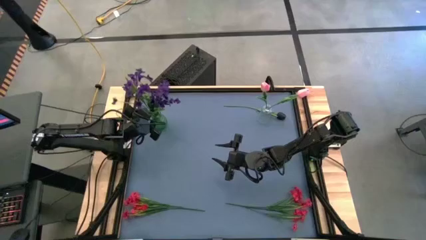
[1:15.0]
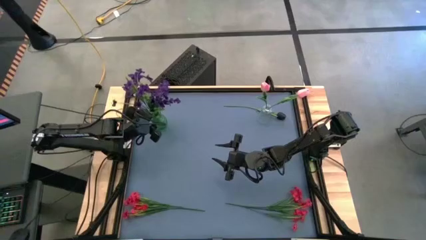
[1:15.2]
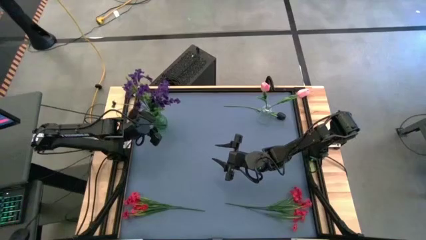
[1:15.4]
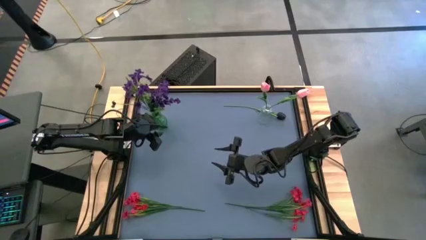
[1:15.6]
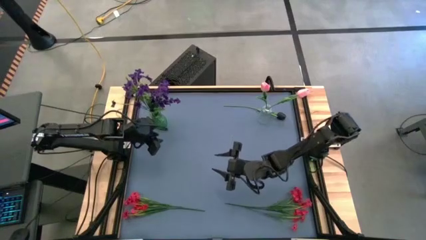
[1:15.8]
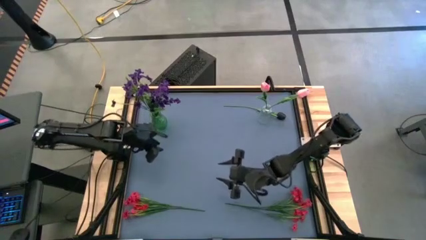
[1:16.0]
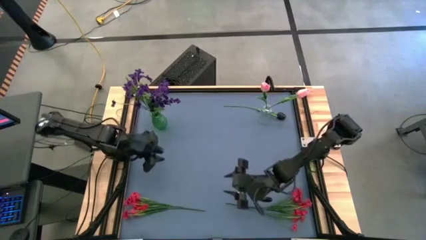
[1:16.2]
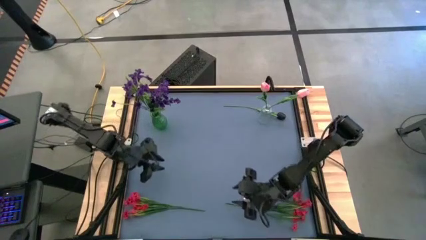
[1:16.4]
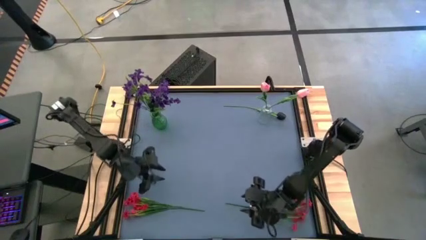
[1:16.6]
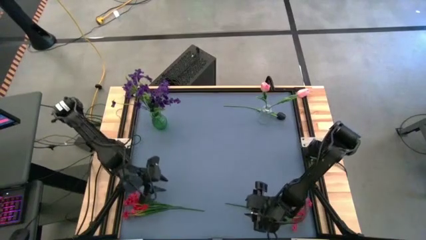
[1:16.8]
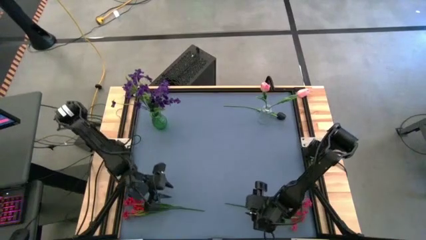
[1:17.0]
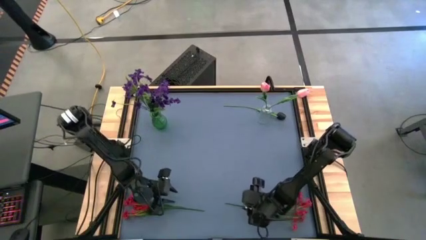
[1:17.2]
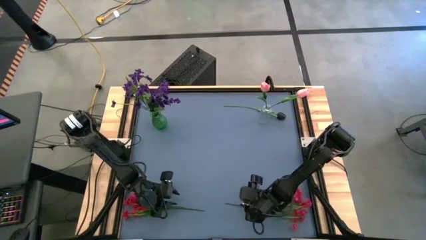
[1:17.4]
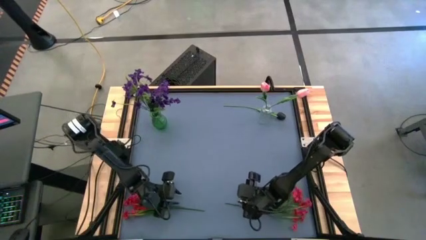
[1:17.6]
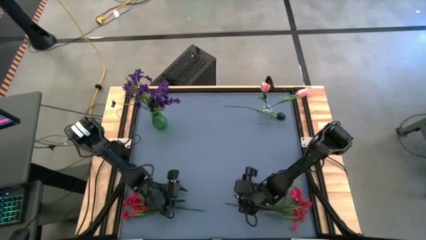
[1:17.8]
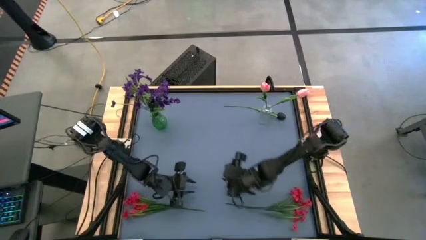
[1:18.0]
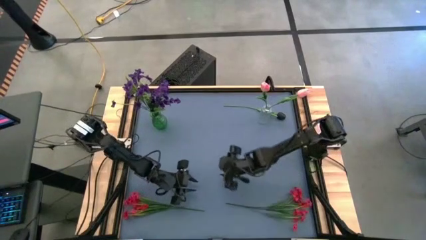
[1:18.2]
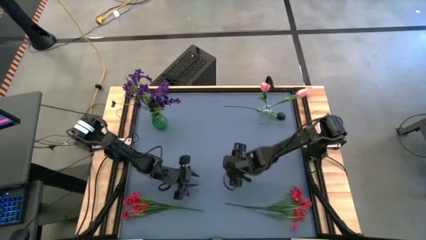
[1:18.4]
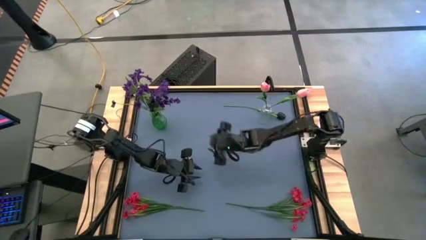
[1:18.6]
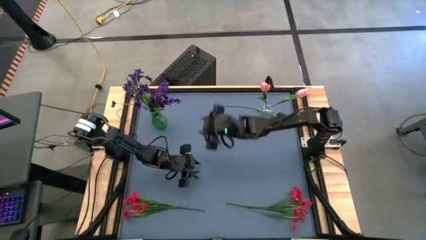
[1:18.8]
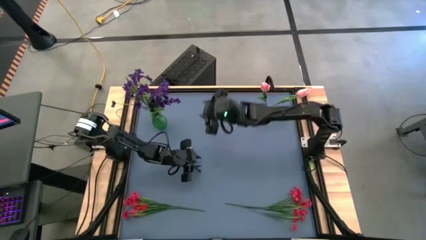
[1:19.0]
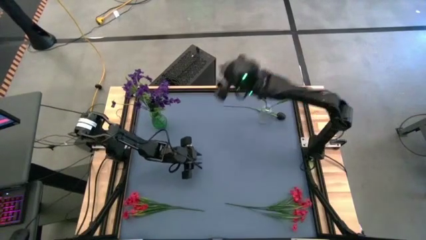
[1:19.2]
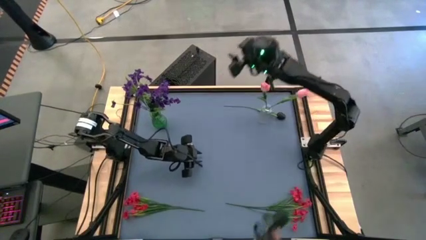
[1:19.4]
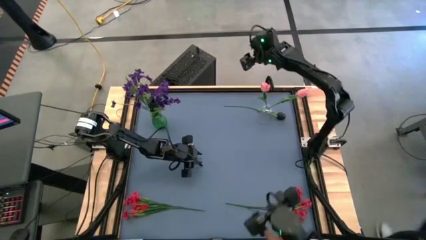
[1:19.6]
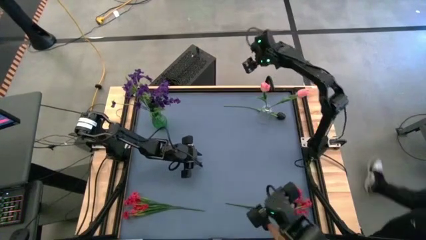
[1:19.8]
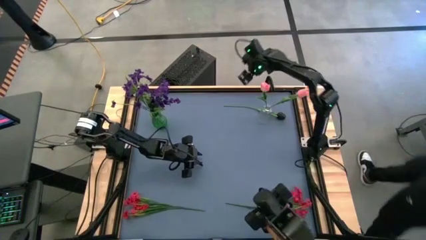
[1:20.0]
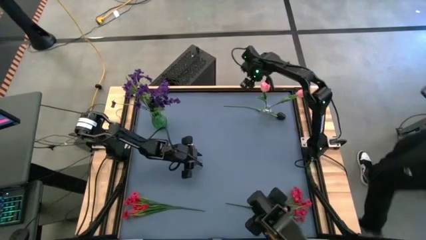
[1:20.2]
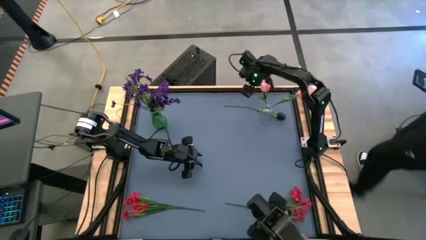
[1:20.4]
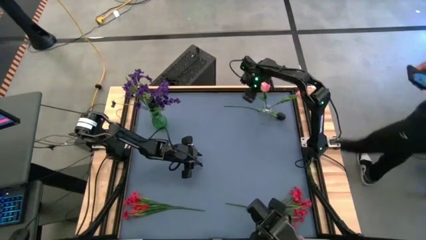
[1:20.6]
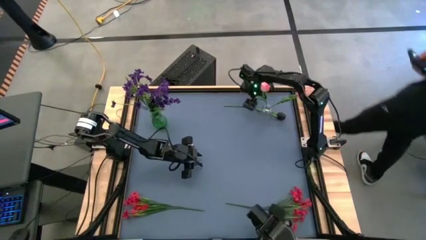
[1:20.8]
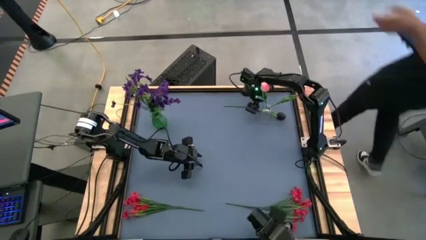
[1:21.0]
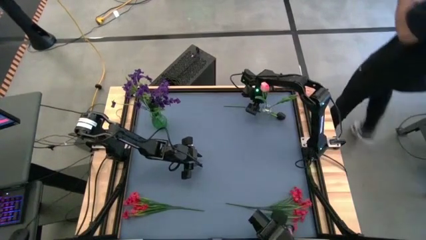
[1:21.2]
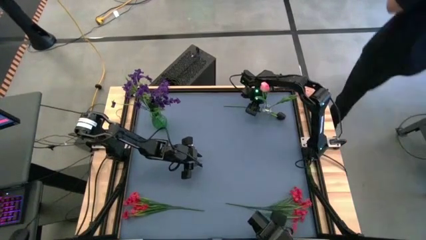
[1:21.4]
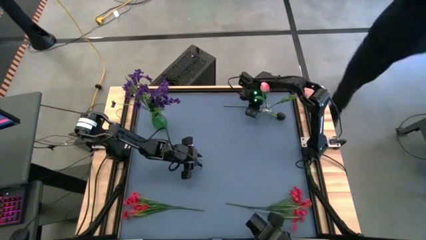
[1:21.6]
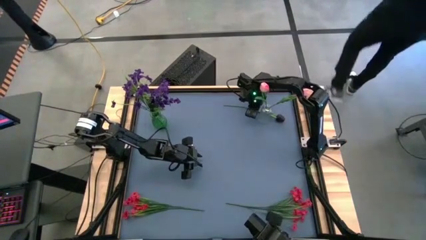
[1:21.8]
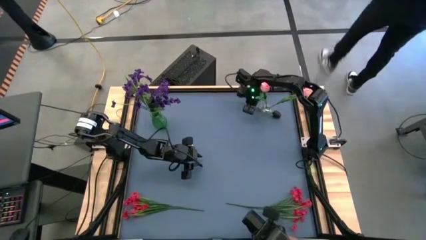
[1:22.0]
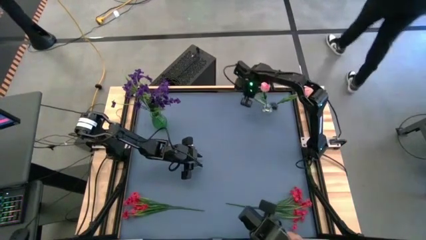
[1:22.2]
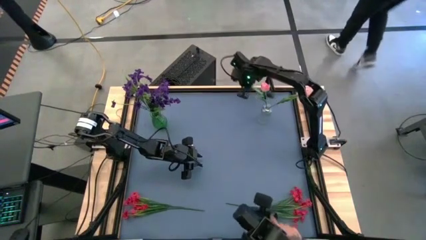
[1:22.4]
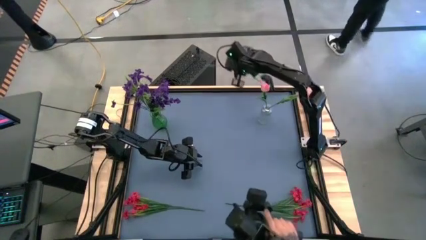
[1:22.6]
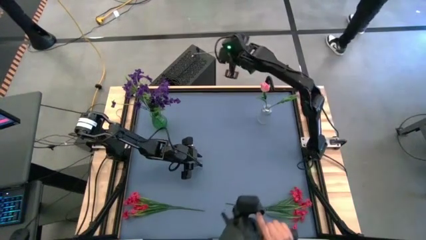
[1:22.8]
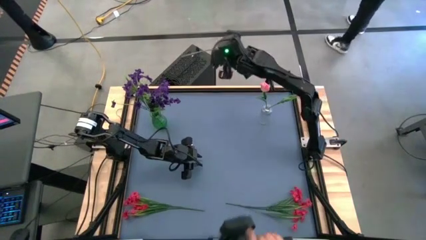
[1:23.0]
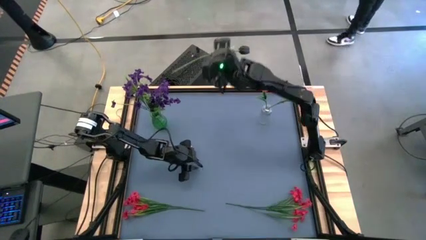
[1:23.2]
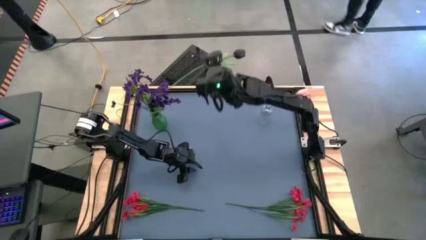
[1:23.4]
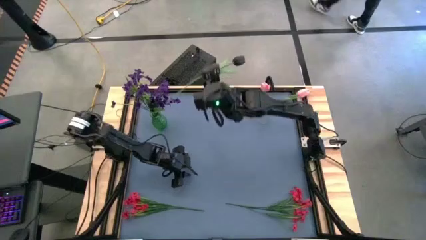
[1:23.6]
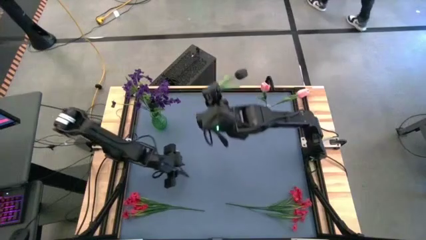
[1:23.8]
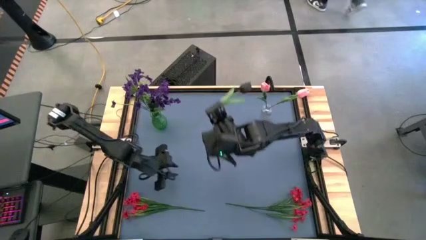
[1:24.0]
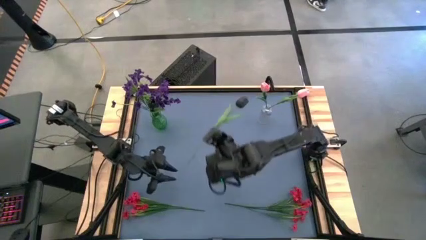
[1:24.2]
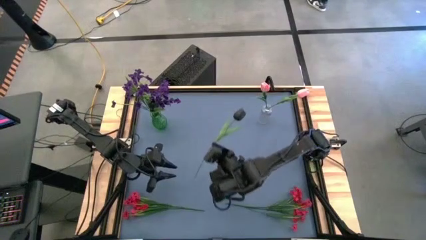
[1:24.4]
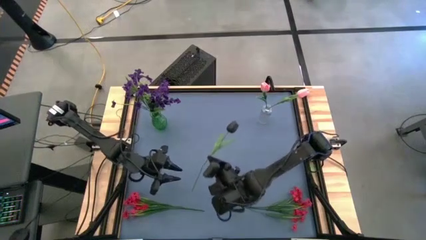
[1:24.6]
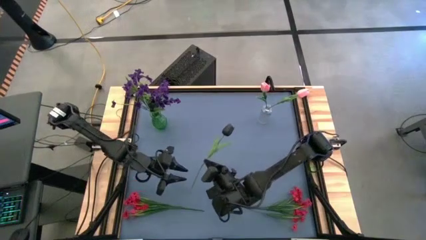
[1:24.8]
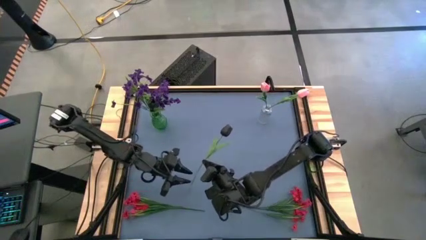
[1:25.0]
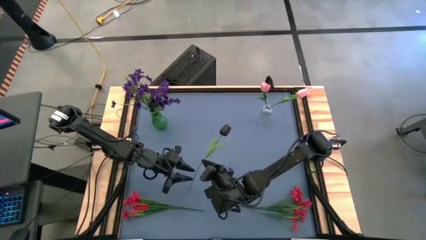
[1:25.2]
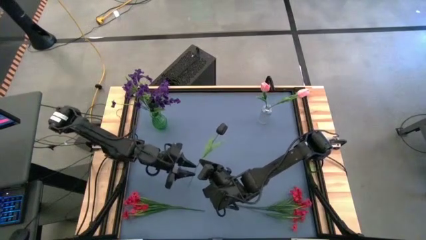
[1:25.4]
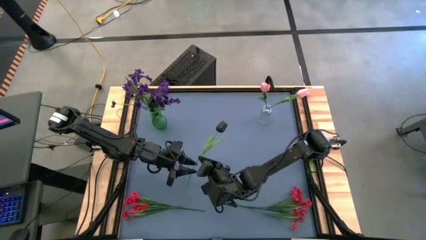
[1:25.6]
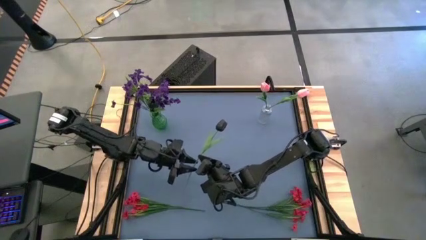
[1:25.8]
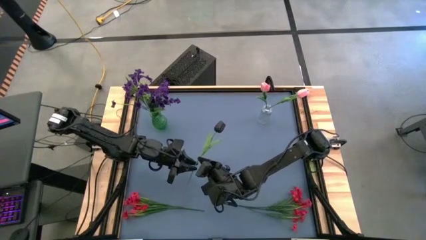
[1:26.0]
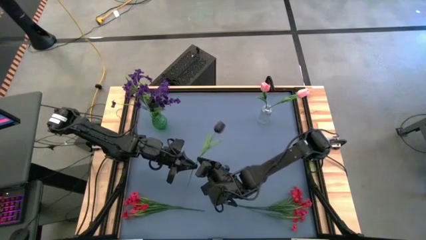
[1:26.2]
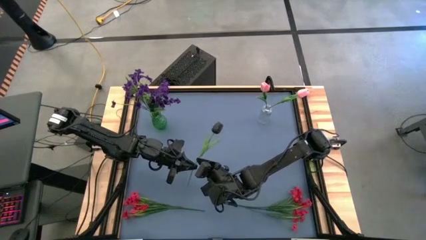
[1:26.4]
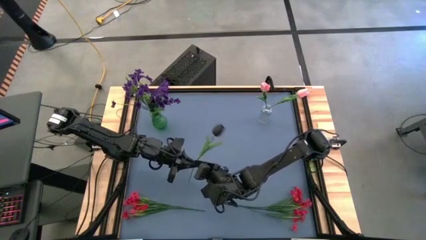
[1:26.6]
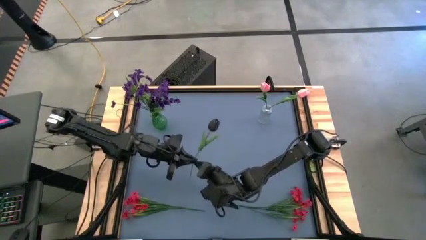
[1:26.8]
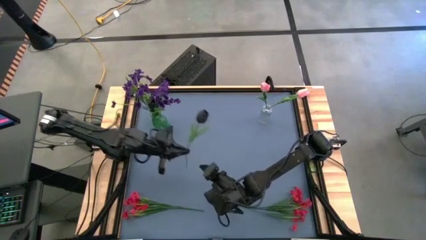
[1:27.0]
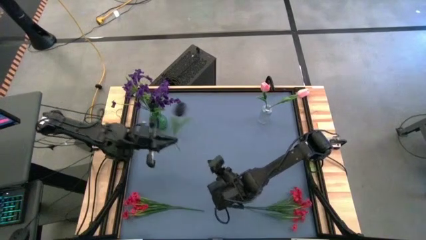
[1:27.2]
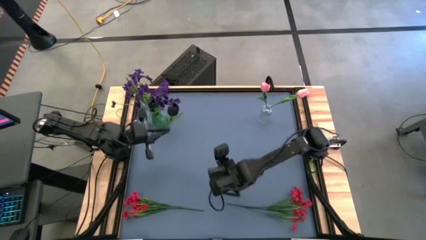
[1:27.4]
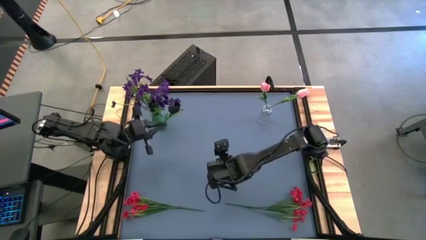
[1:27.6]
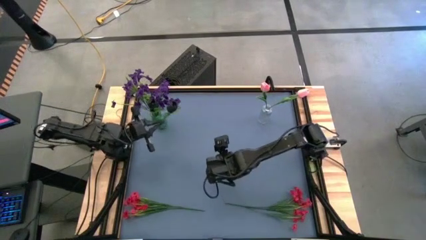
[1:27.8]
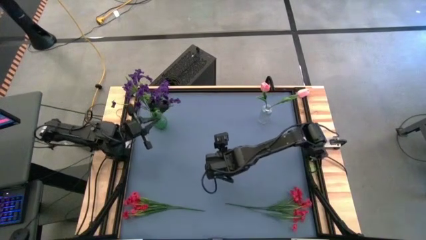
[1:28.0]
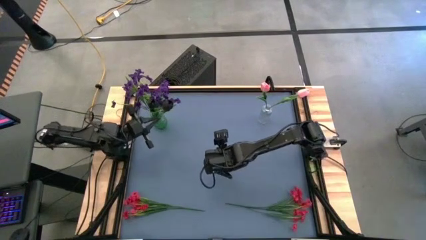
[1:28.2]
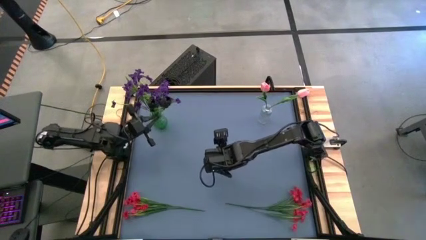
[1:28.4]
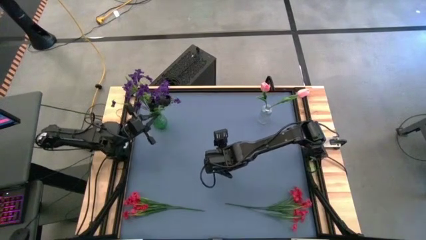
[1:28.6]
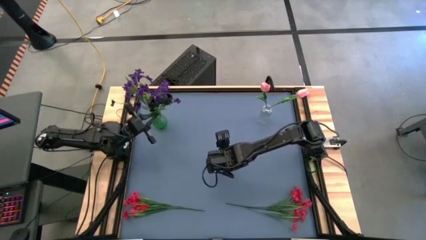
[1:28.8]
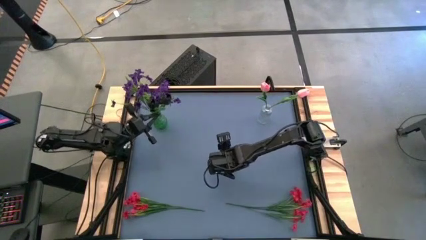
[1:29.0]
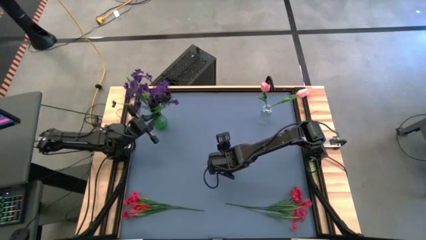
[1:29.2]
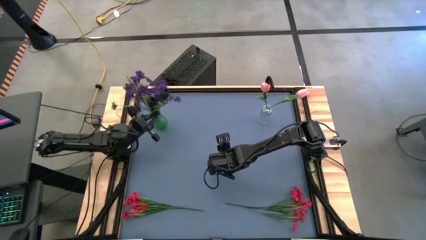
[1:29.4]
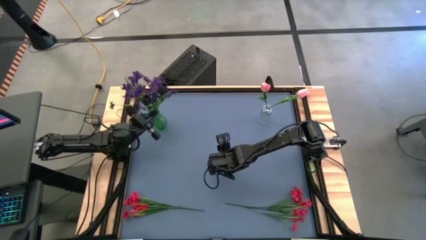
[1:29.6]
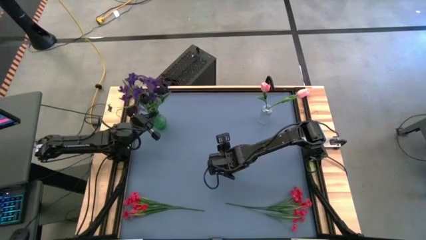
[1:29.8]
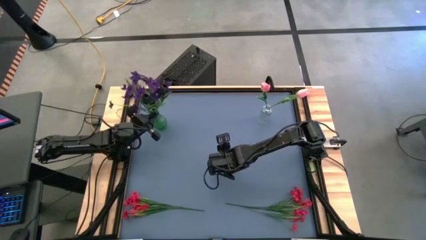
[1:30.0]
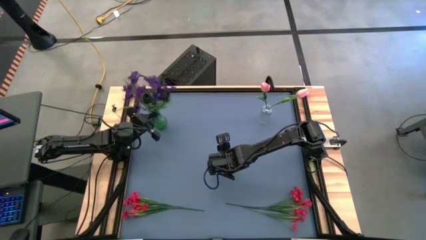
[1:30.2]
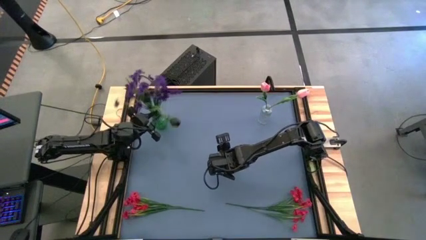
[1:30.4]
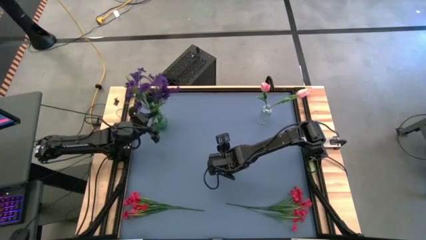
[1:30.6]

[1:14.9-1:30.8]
Task: Sort flowers into vase by color
Put the black flower into the green vase
